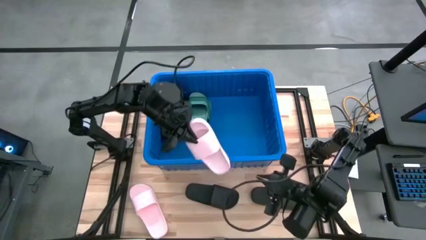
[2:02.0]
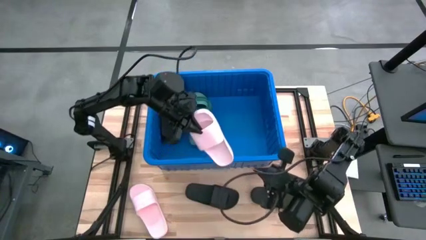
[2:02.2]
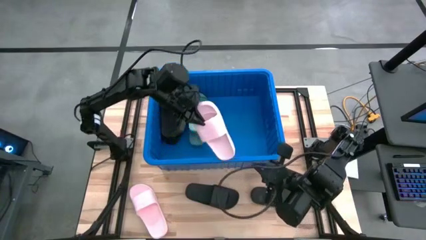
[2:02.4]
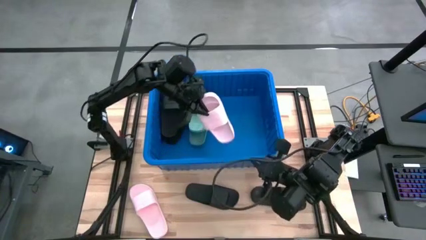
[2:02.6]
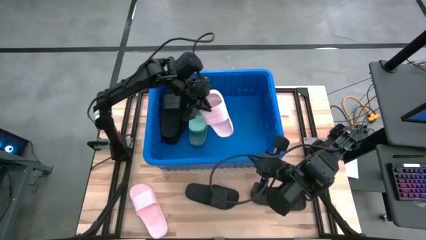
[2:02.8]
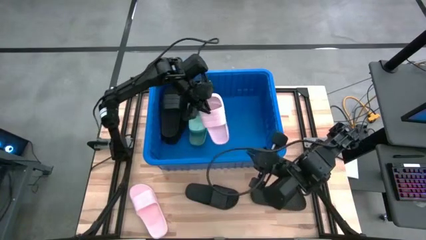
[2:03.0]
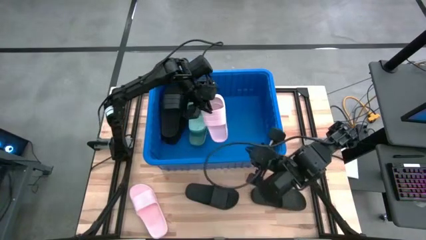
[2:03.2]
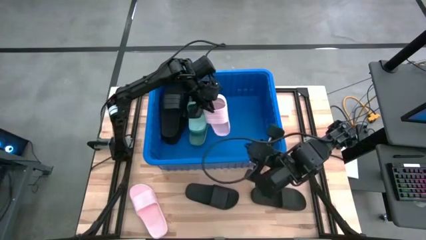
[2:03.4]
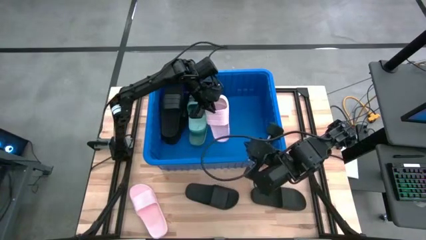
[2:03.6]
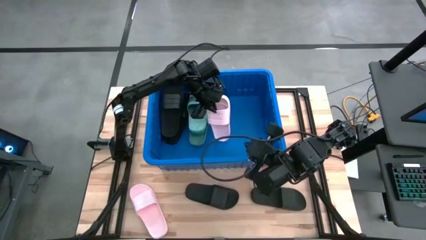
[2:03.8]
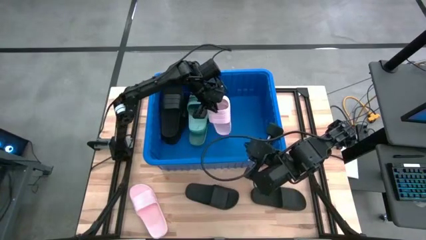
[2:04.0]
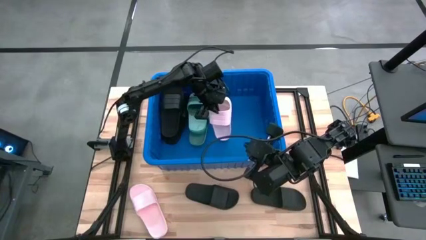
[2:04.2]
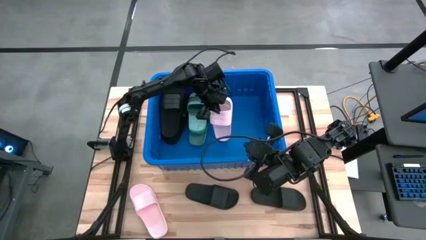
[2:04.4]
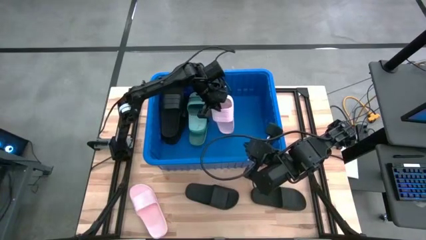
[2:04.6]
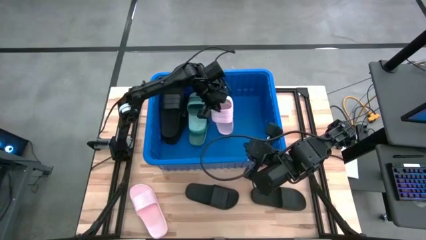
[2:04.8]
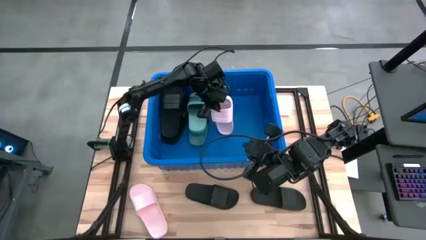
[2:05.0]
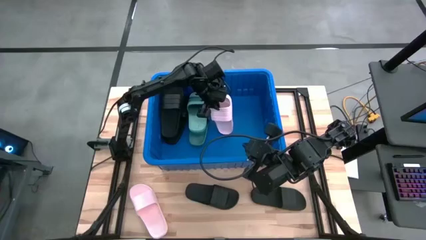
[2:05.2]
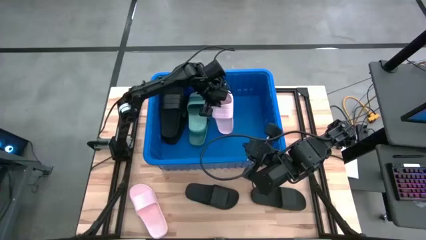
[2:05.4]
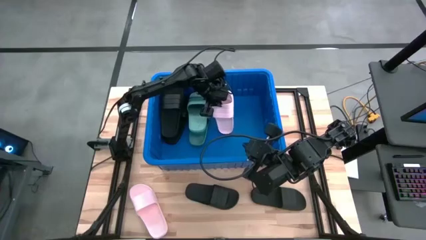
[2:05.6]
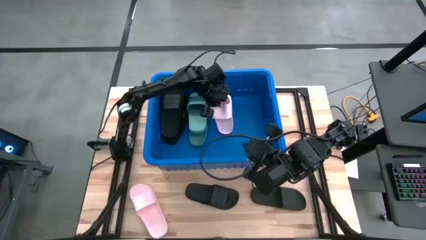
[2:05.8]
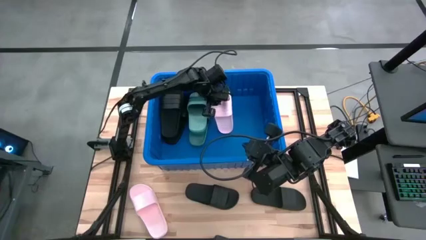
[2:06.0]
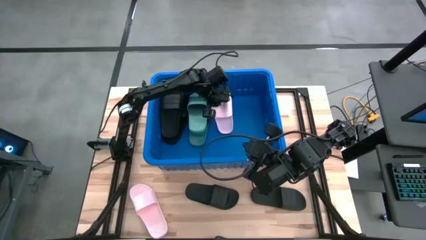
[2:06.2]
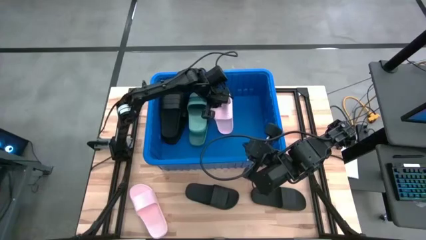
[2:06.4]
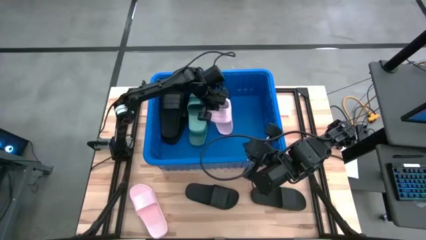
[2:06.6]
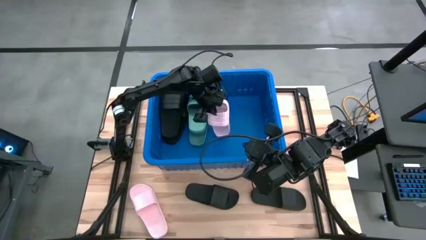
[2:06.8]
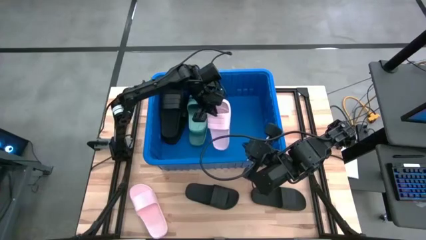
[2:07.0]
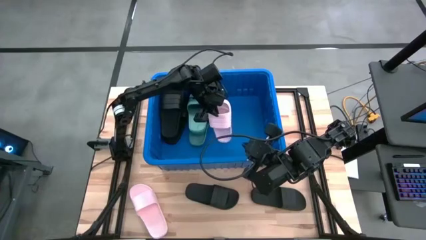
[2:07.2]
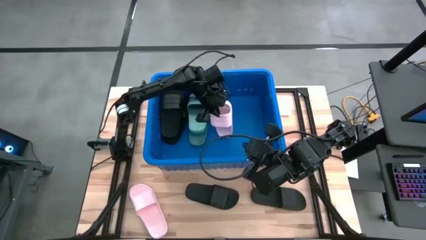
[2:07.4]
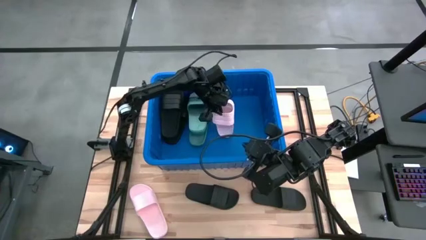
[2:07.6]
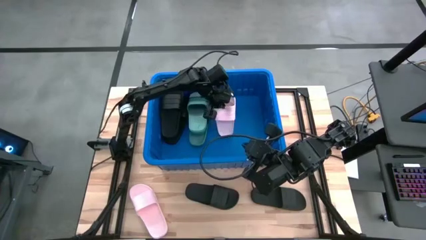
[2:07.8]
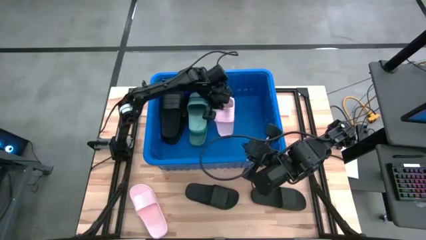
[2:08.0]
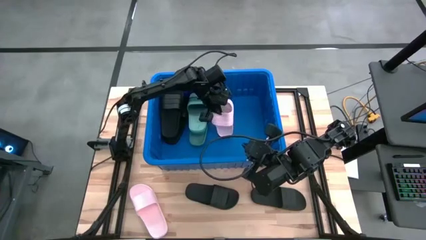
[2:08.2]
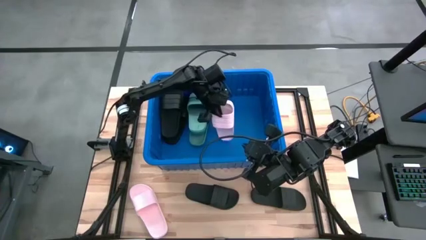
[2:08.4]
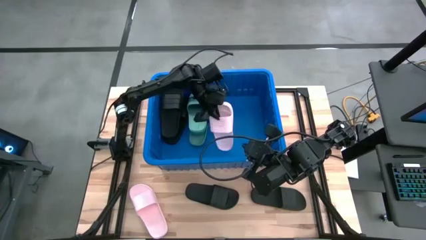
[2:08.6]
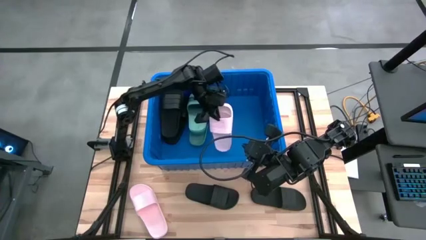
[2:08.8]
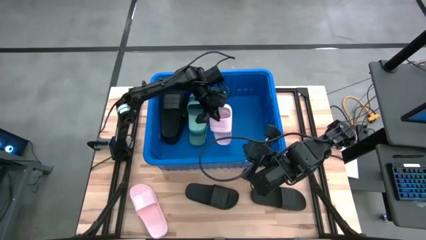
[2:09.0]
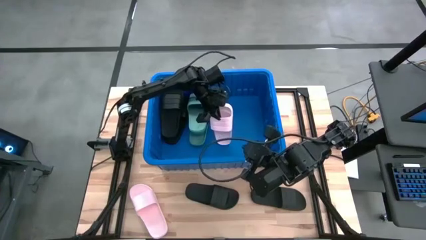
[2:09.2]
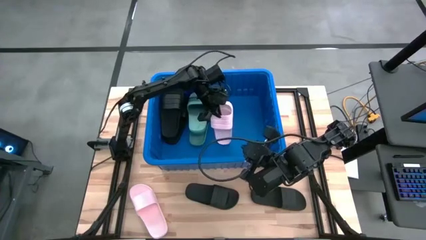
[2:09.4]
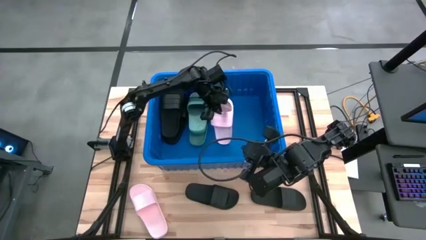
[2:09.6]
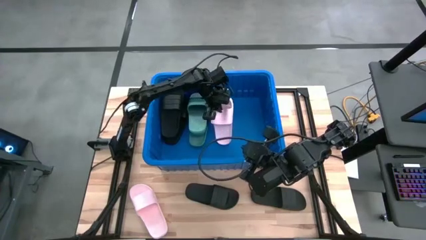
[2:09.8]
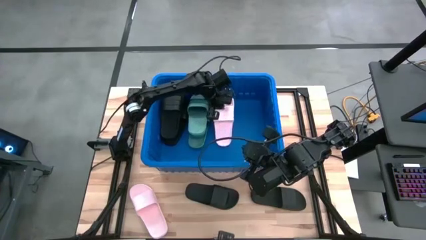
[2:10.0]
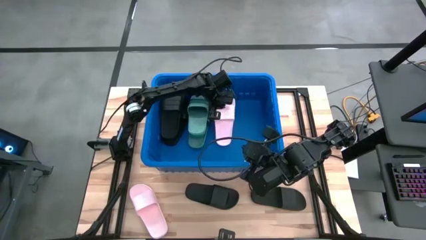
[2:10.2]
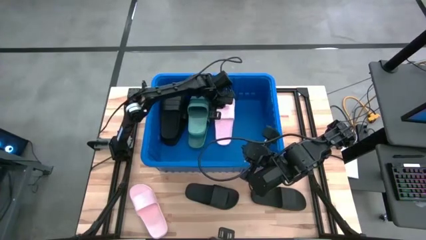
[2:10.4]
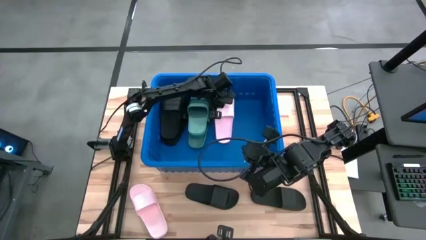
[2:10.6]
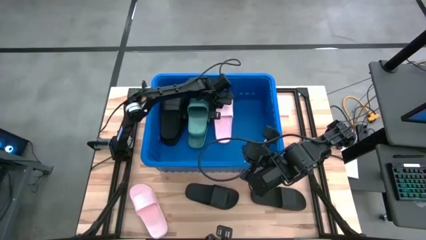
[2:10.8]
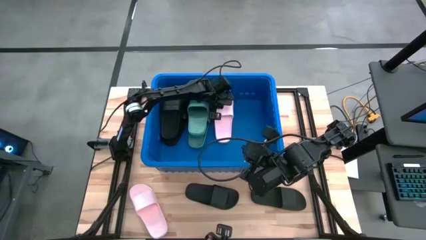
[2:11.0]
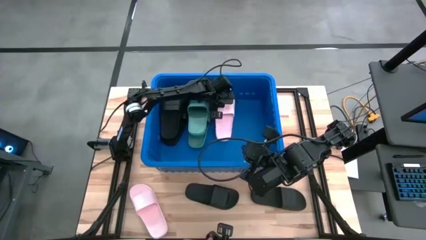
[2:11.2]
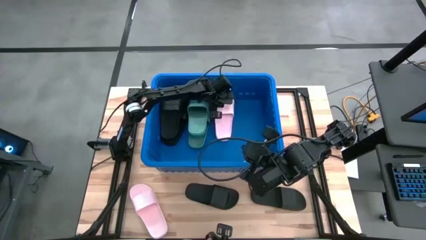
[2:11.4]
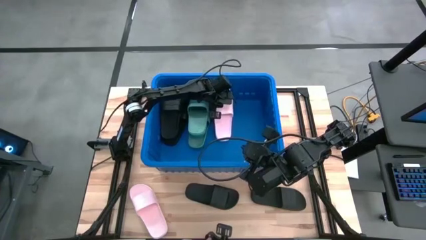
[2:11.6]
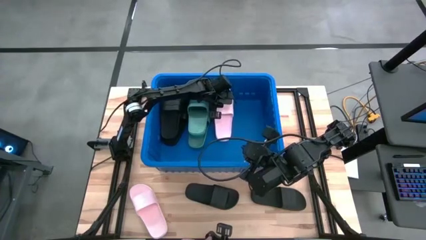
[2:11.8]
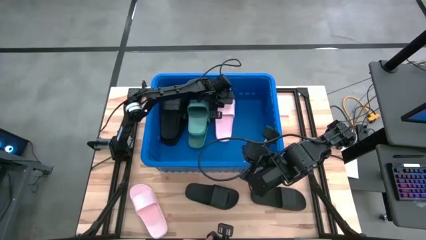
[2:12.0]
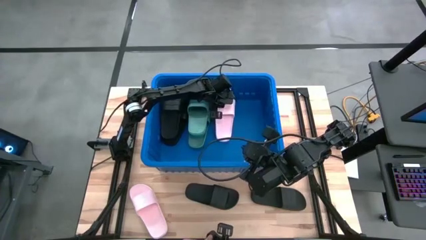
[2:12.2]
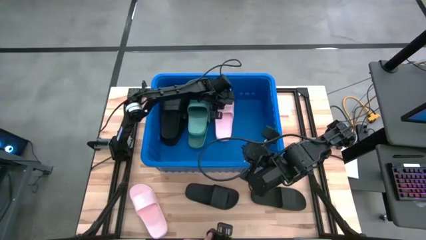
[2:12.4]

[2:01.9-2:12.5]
Task: Pick and place slides into bin
Put the pink slipper into the blue bin

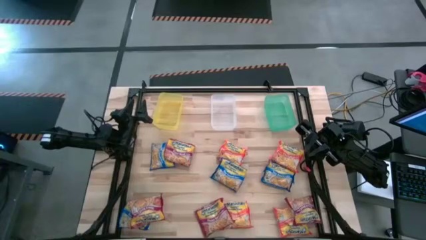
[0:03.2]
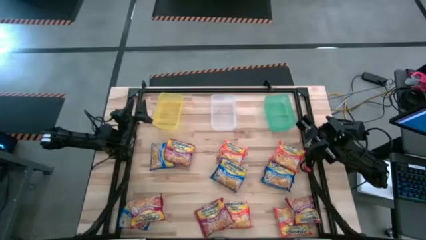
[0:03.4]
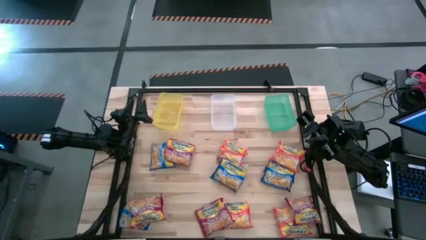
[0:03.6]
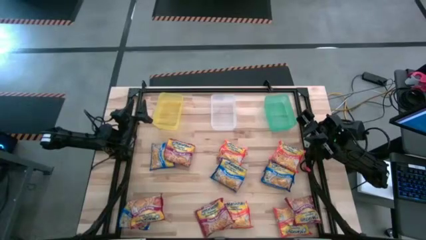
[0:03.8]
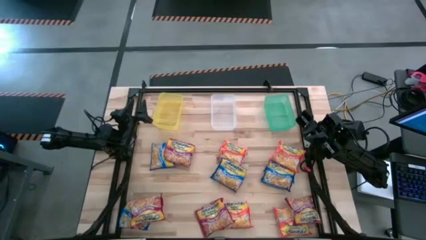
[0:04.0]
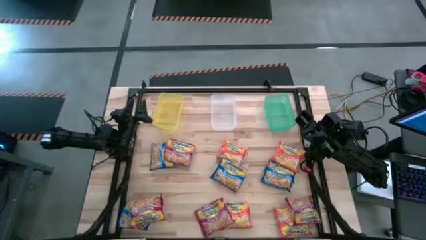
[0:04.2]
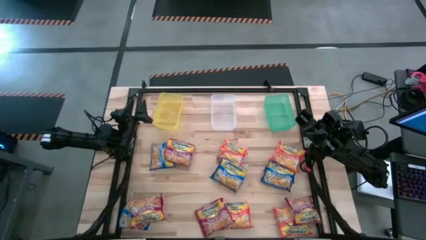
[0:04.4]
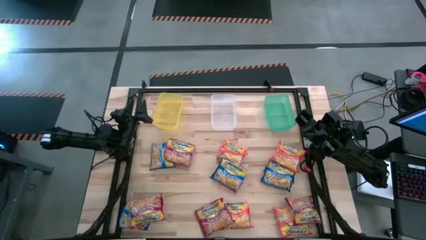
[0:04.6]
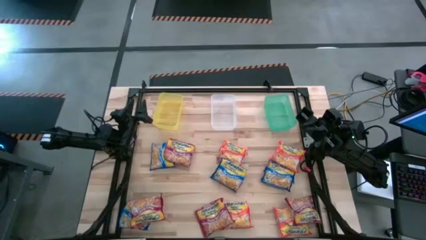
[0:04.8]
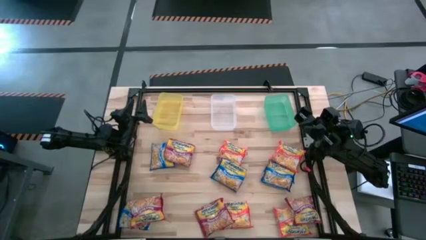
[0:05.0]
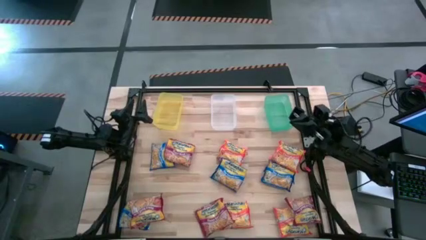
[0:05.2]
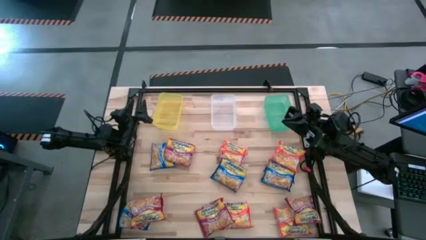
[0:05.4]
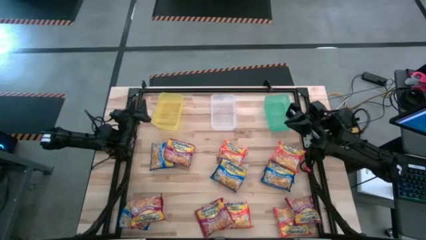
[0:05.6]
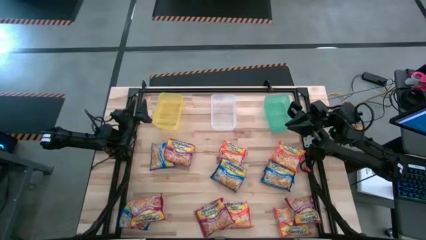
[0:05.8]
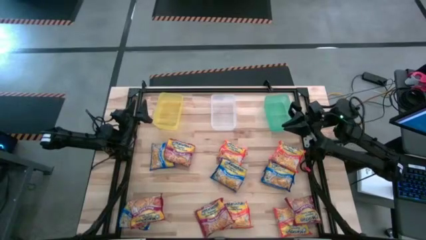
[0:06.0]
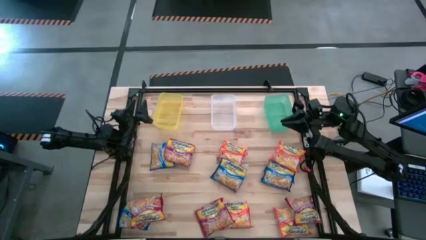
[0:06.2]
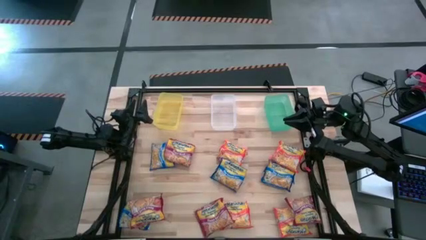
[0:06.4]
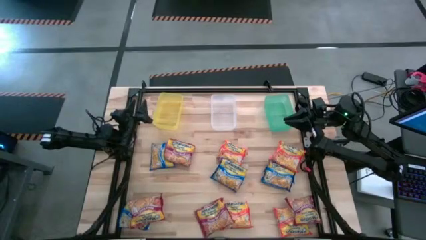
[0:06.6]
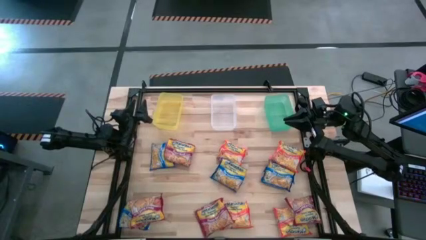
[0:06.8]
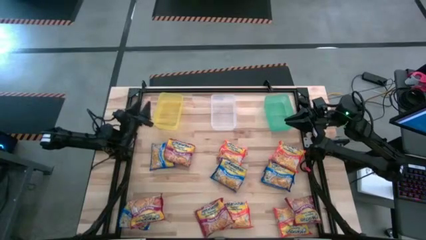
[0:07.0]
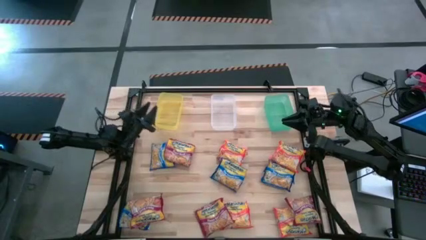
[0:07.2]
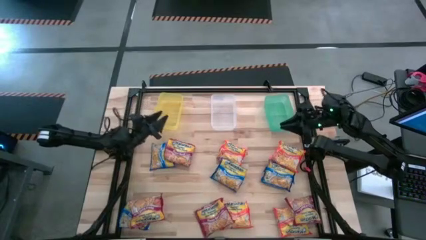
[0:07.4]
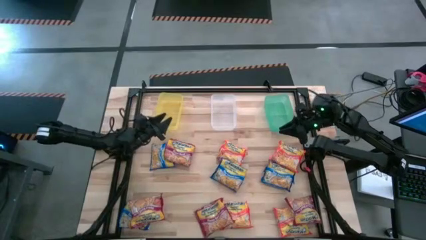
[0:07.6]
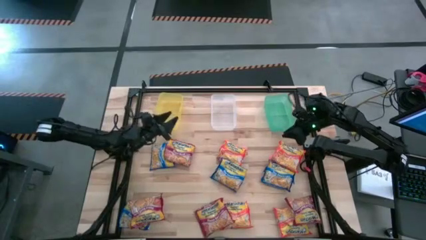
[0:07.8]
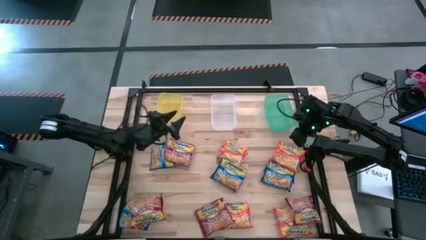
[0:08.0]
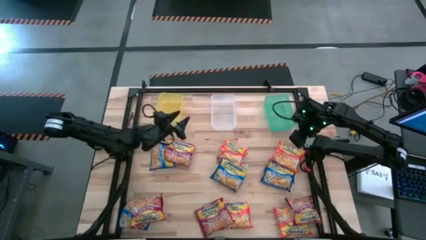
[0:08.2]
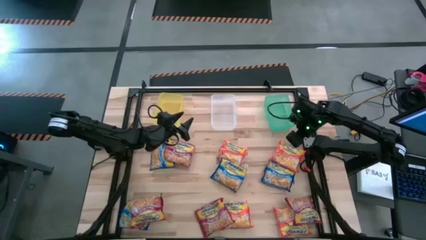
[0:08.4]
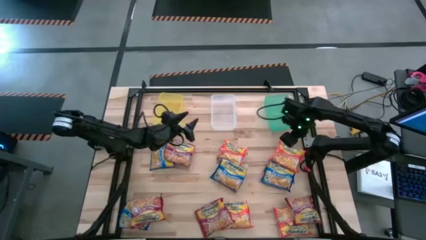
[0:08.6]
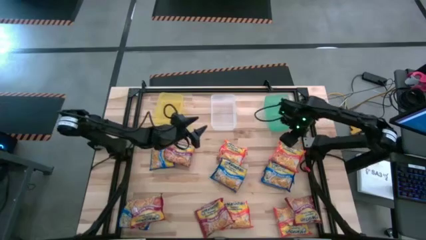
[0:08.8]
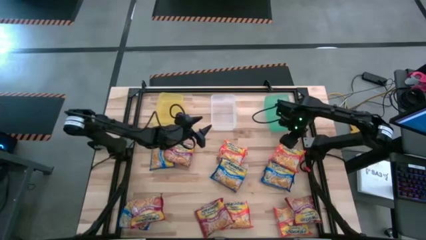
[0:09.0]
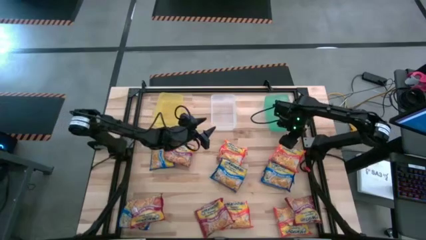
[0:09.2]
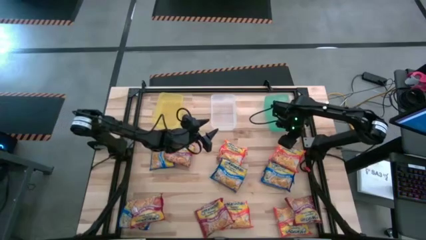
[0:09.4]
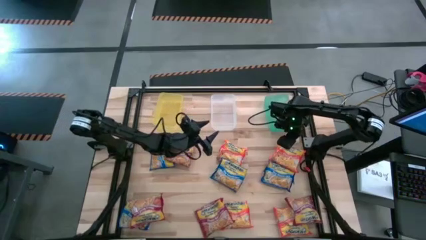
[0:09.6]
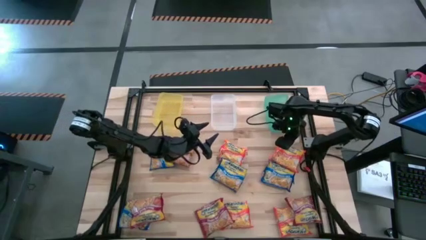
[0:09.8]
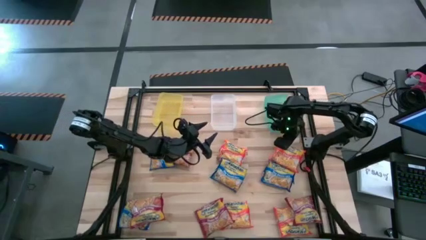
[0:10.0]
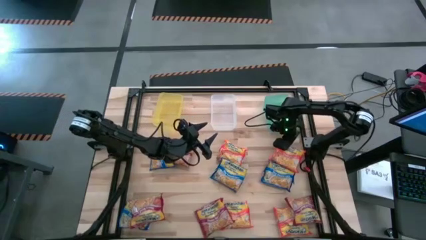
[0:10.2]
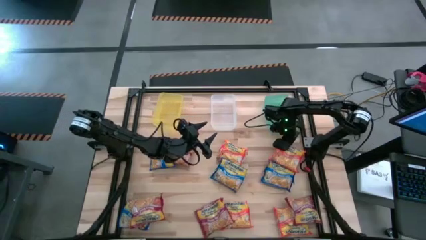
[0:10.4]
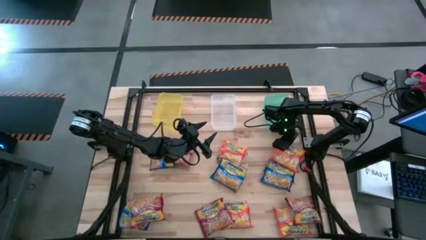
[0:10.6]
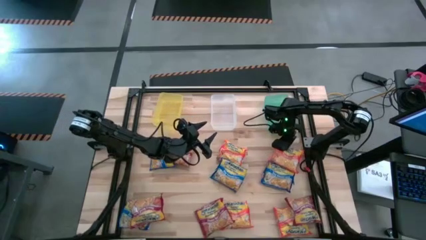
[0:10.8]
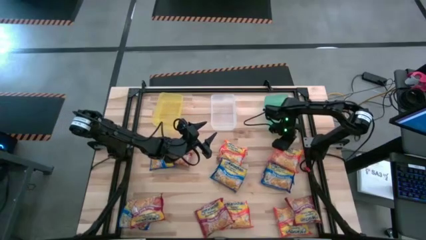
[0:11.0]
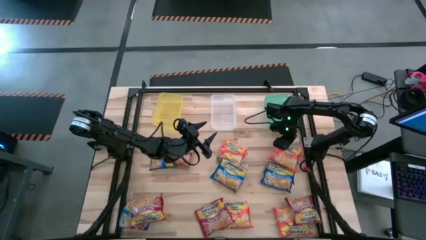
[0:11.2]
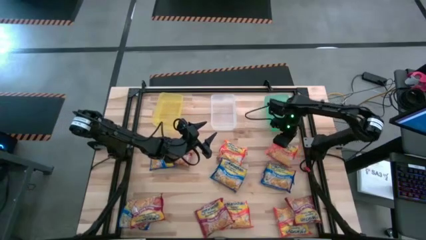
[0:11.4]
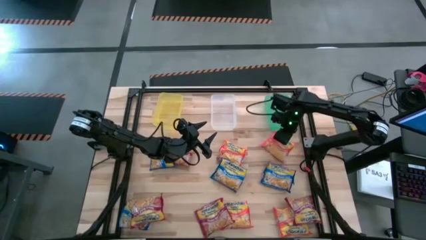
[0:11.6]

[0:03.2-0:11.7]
Task: Sort Maruchan noodles
Put the top right orange noodle pack into the green bin
